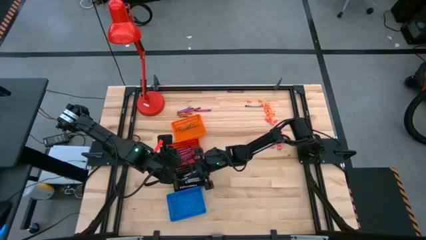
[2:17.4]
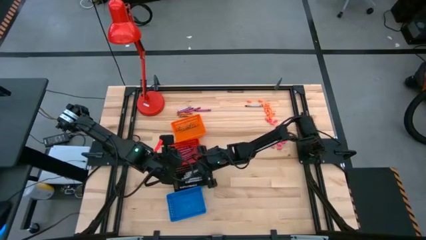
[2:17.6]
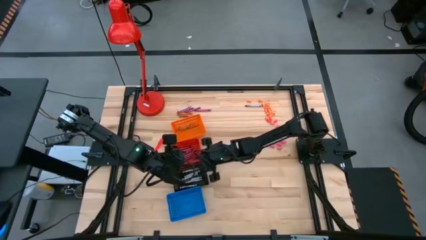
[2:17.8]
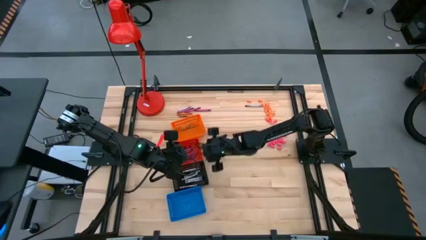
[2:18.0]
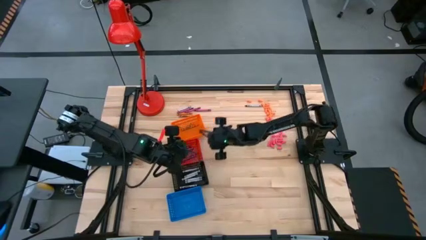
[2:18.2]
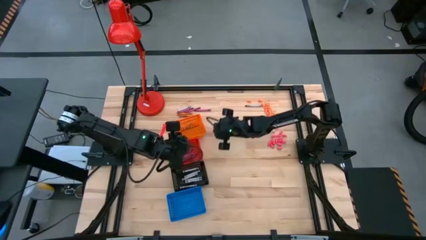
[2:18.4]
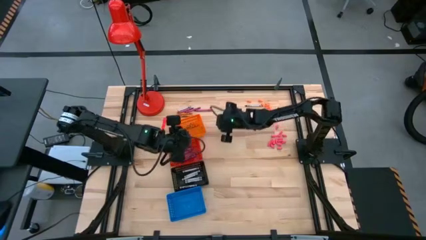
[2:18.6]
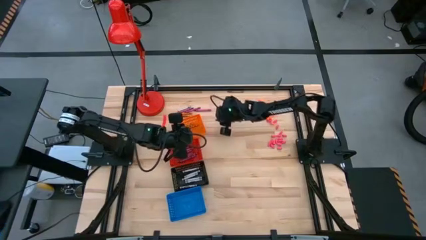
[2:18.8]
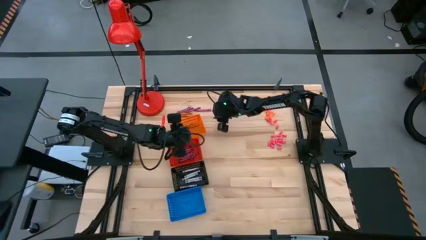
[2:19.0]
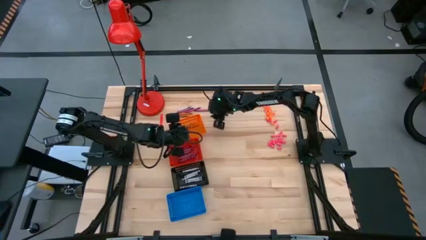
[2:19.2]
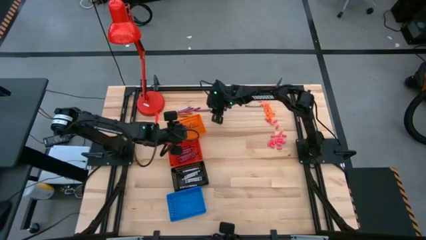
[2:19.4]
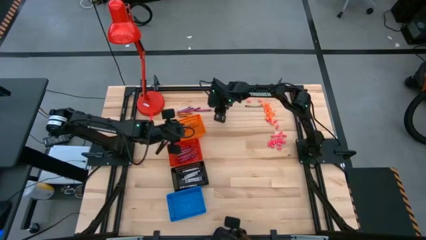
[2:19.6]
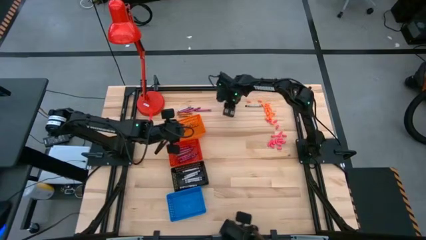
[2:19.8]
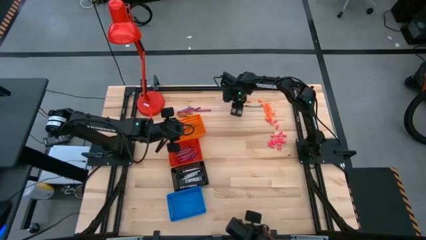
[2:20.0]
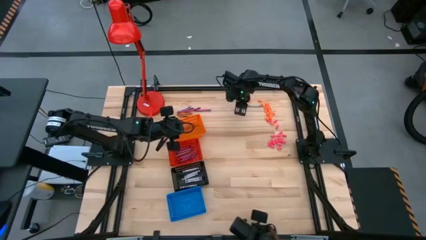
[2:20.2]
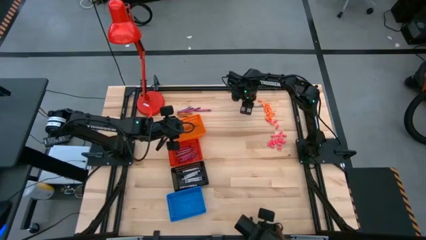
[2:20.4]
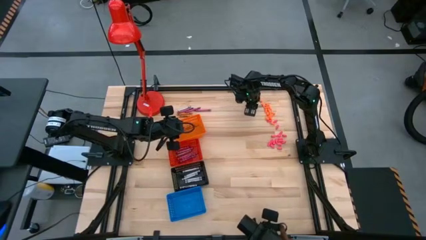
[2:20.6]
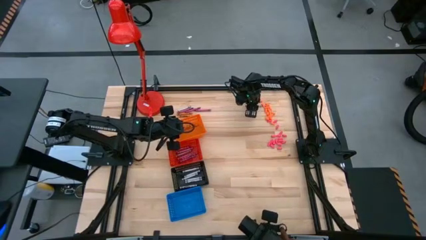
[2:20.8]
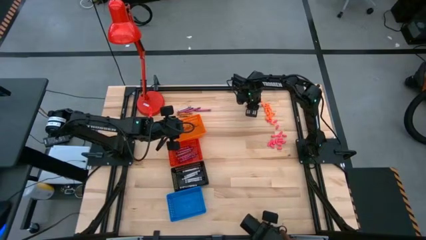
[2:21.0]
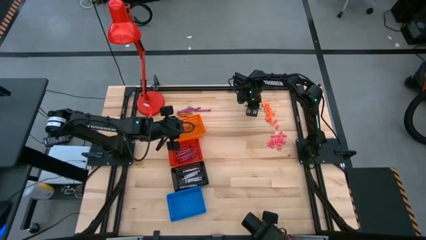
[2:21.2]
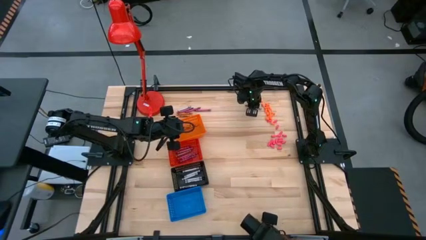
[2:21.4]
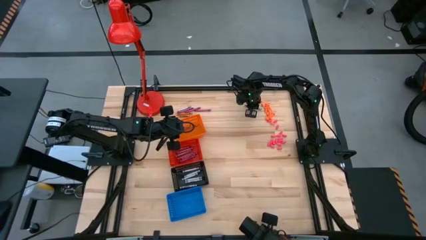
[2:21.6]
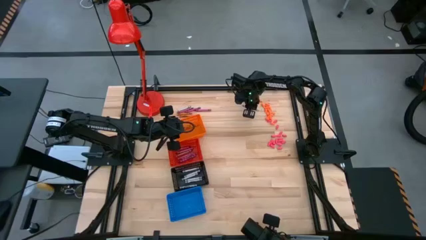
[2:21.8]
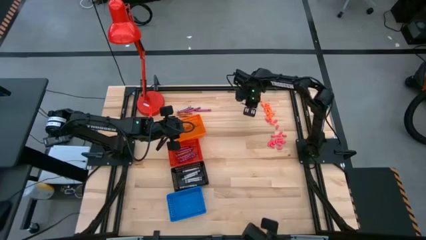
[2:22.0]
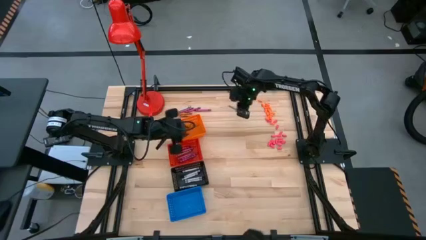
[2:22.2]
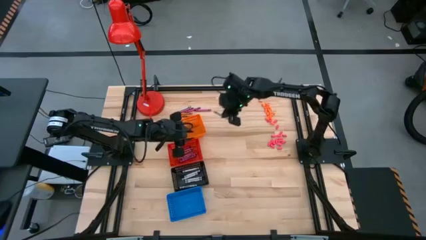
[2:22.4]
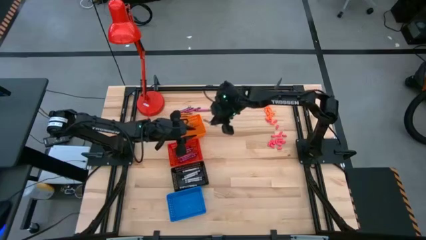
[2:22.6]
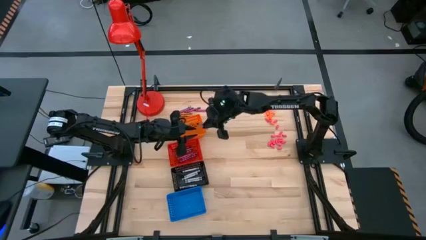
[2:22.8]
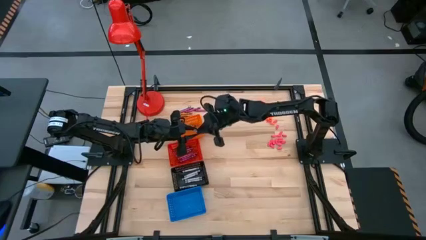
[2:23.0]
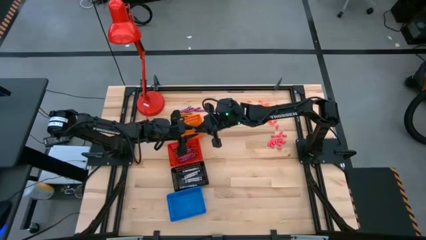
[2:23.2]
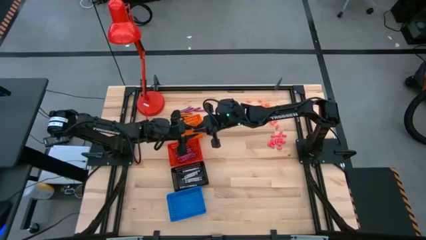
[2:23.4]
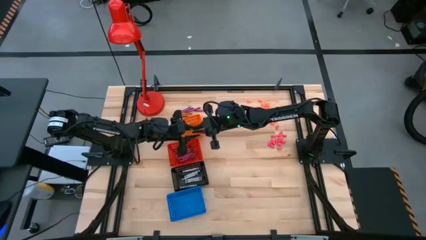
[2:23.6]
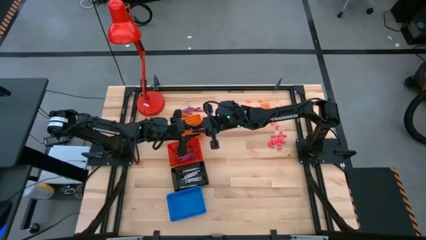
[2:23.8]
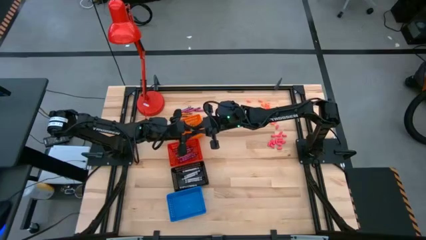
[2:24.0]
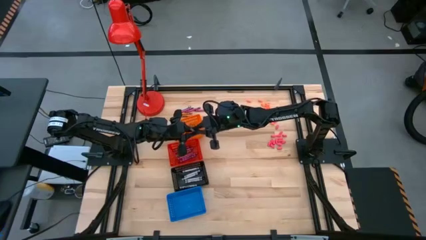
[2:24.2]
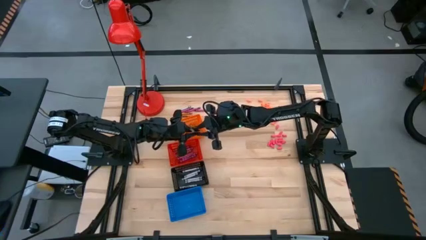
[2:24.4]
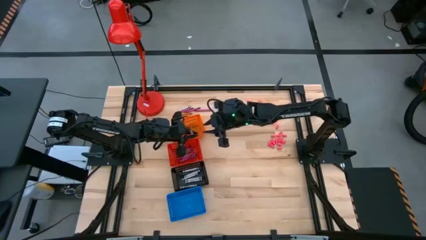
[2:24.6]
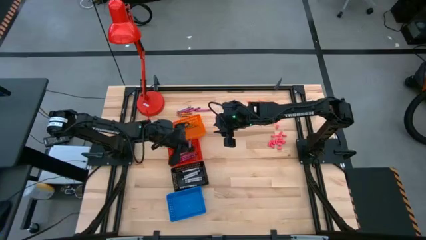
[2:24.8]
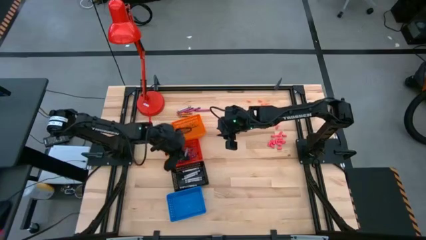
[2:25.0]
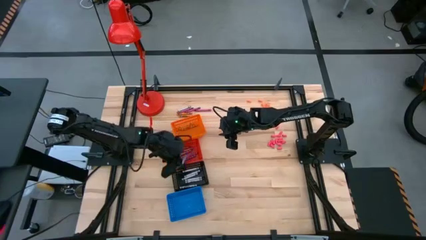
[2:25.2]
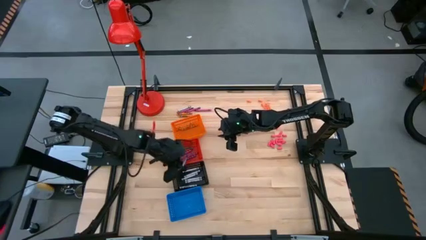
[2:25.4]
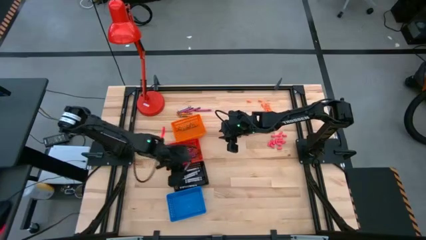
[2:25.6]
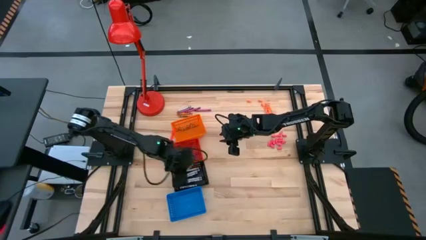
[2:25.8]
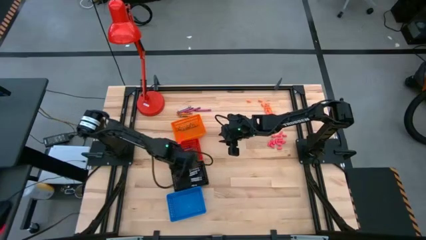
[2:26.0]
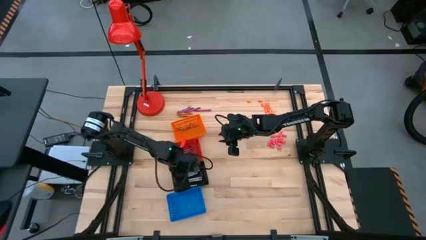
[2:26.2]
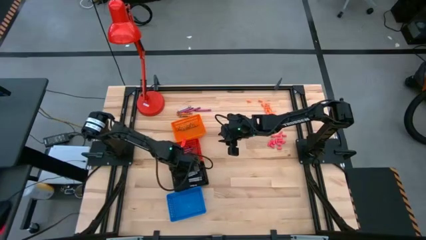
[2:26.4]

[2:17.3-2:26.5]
Task: Sort crayons
Put the black crayon into the black basket

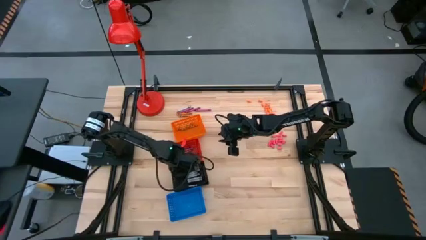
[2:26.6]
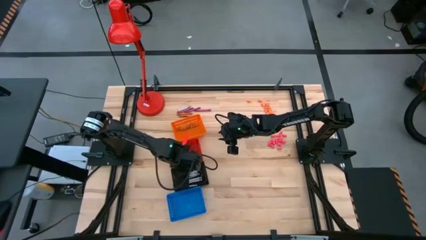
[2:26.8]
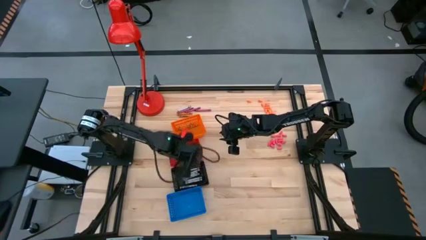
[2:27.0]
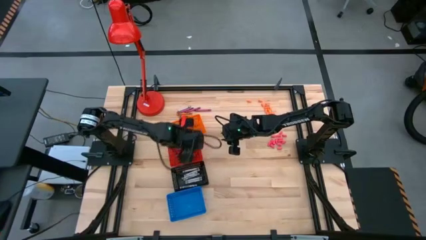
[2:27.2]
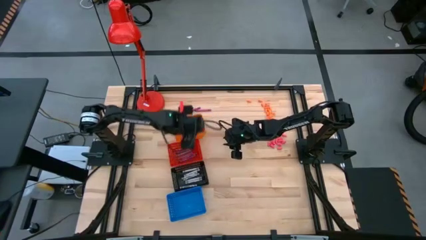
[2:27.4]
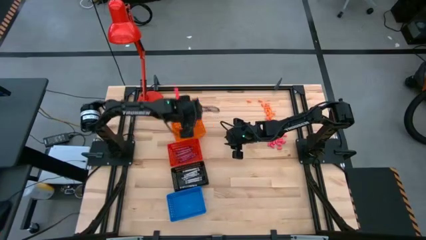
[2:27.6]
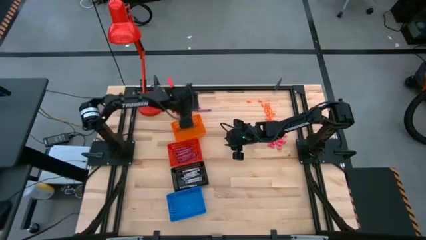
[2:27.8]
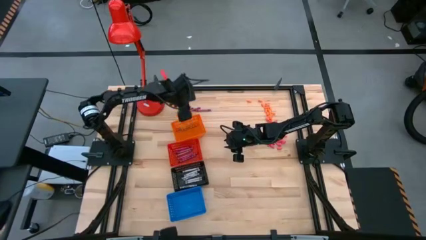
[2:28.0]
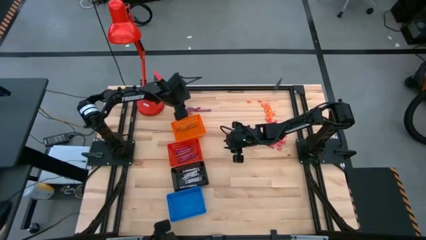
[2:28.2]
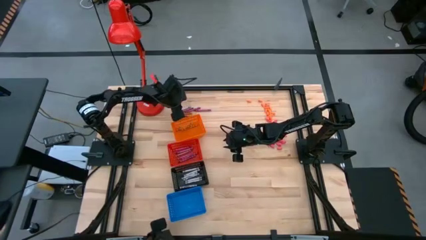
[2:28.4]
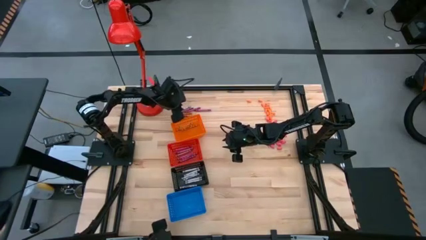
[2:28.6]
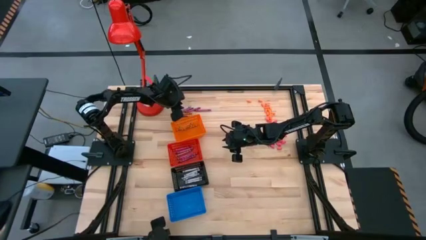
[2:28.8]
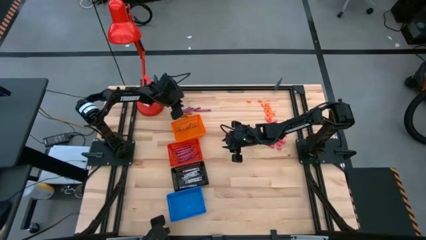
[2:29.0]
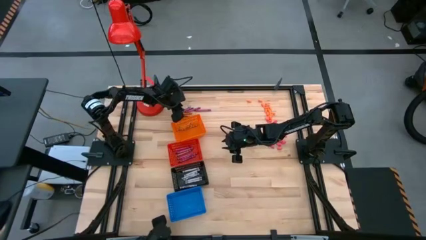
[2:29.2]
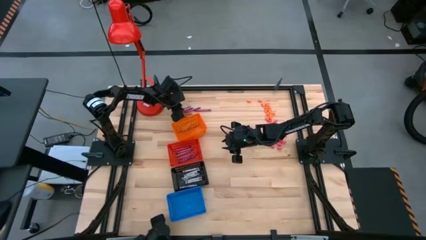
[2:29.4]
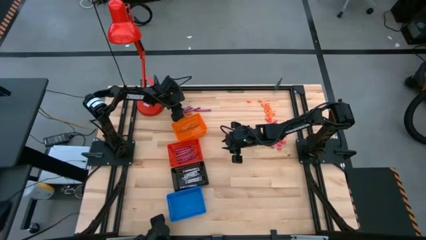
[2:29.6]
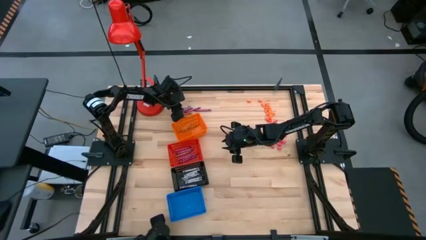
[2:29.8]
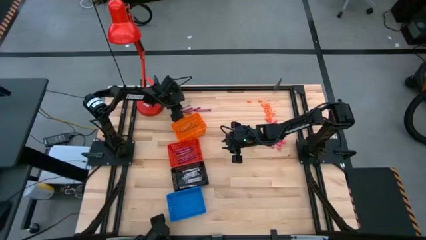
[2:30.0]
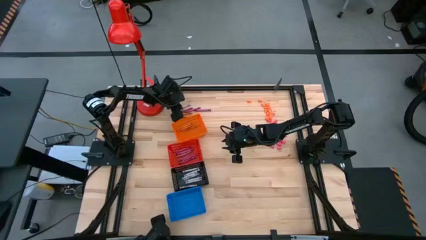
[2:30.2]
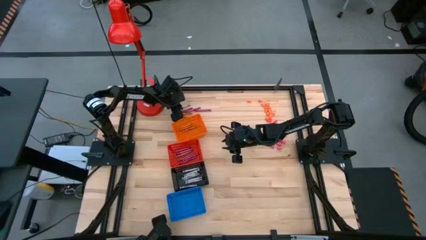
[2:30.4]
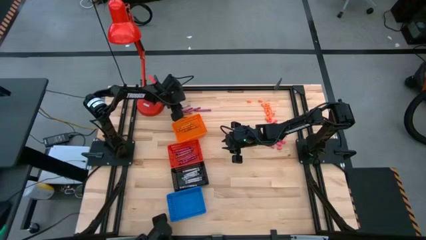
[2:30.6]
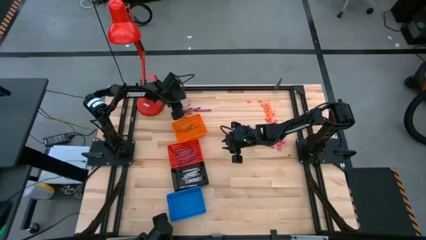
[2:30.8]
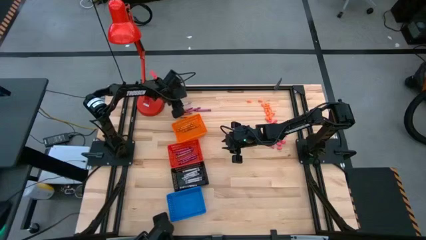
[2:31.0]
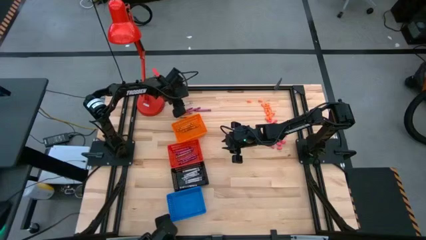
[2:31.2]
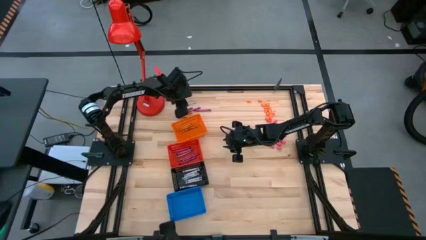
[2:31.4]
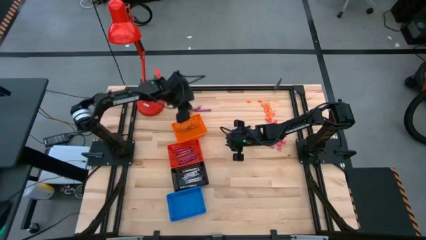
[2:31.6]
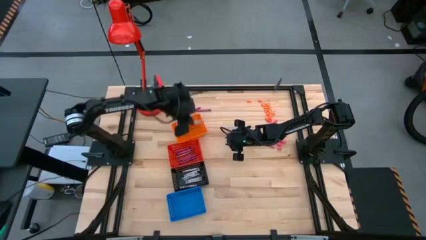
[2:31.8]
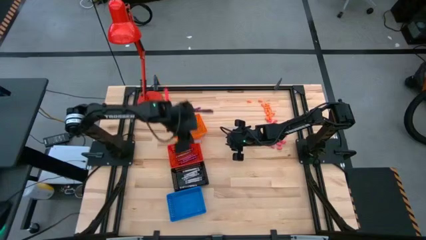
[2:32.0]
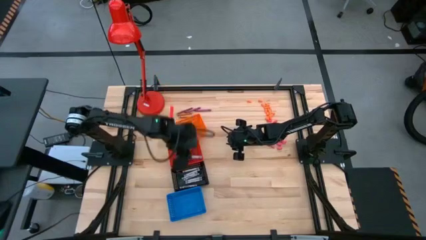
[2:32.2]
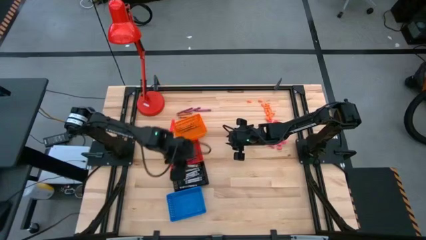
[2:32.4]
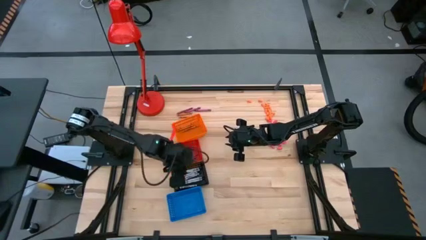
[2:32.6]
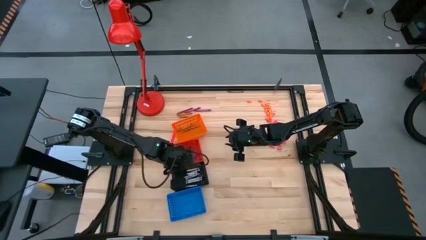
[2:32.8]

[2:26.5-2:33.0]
Put the black crayon into the black basket
